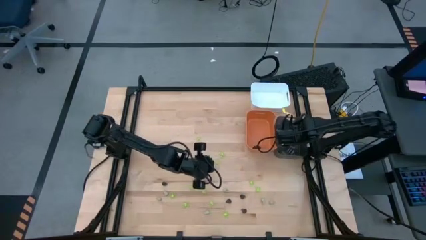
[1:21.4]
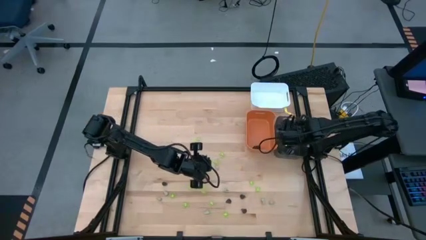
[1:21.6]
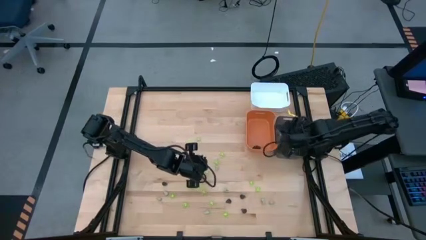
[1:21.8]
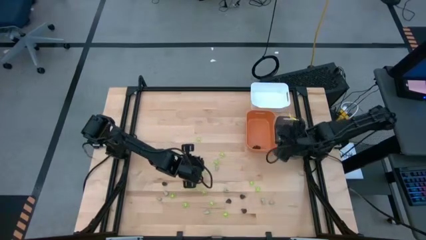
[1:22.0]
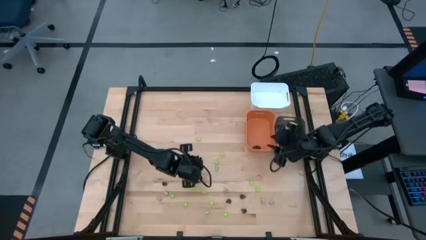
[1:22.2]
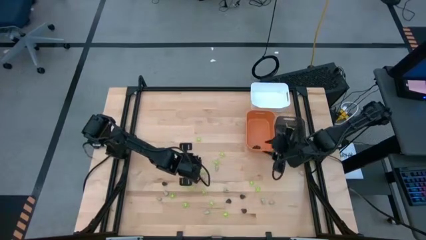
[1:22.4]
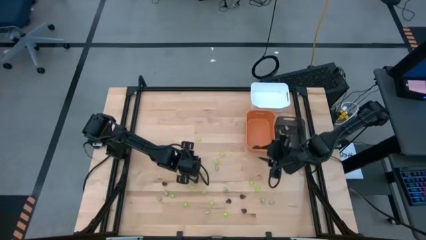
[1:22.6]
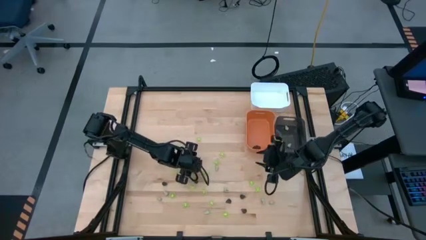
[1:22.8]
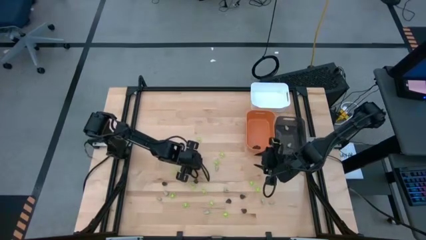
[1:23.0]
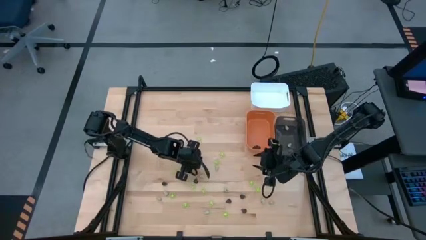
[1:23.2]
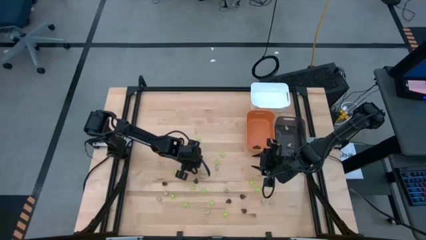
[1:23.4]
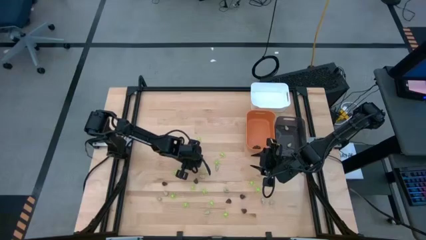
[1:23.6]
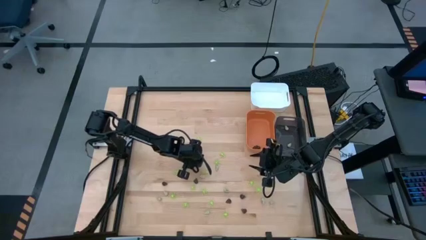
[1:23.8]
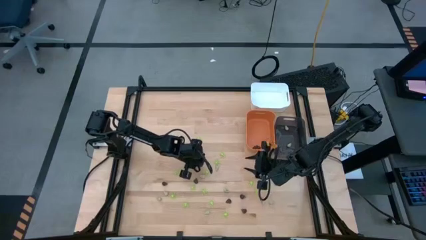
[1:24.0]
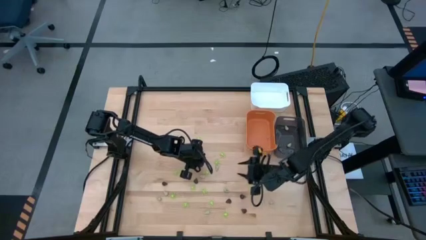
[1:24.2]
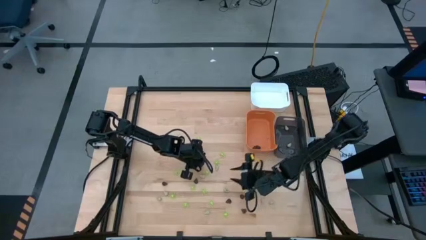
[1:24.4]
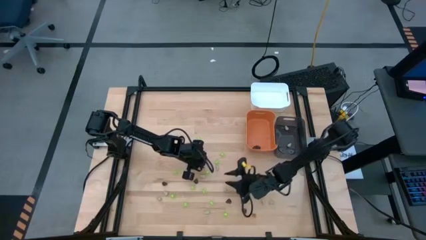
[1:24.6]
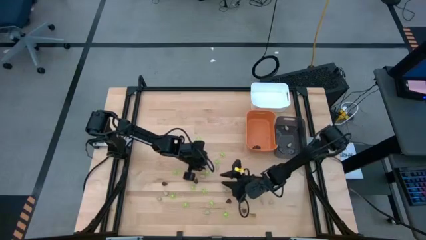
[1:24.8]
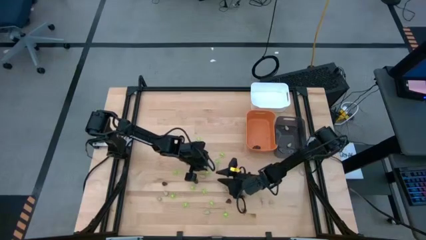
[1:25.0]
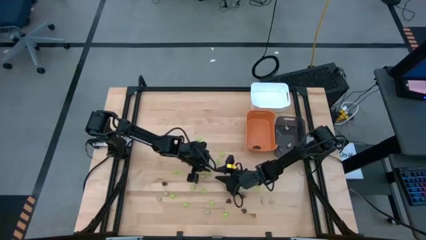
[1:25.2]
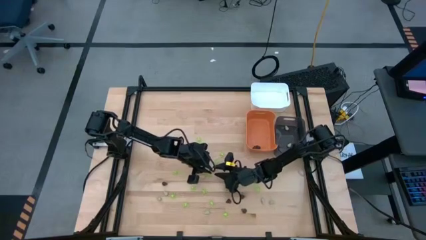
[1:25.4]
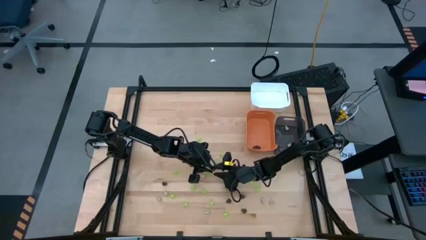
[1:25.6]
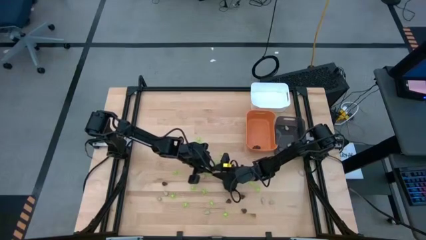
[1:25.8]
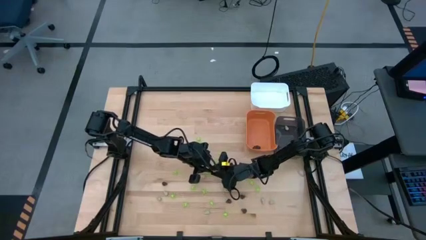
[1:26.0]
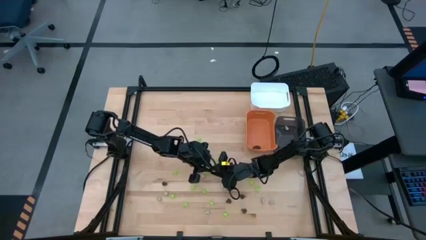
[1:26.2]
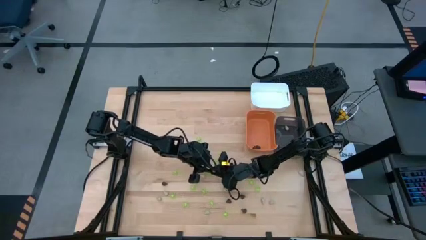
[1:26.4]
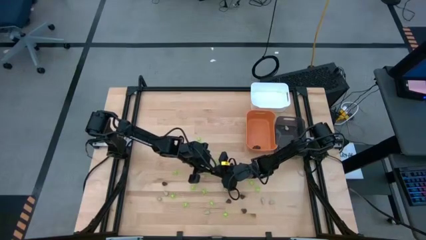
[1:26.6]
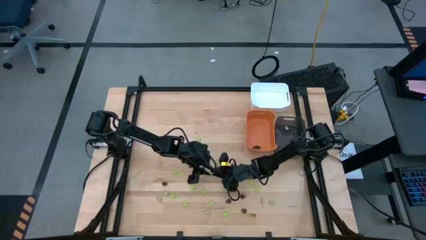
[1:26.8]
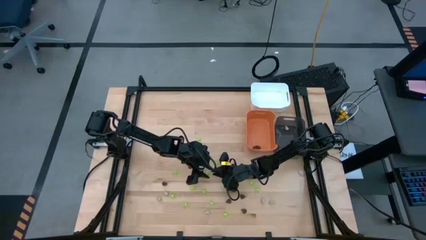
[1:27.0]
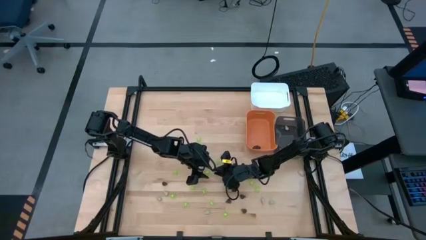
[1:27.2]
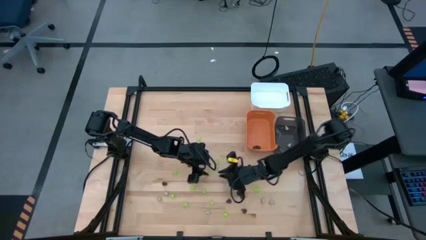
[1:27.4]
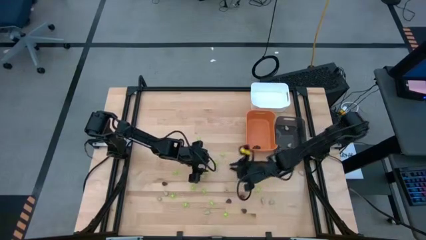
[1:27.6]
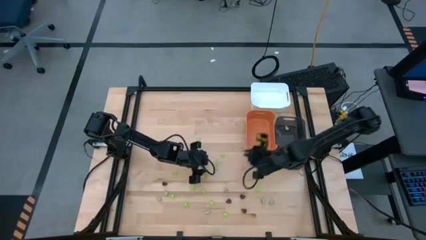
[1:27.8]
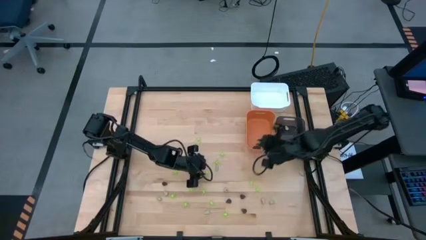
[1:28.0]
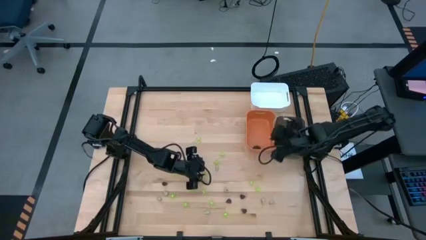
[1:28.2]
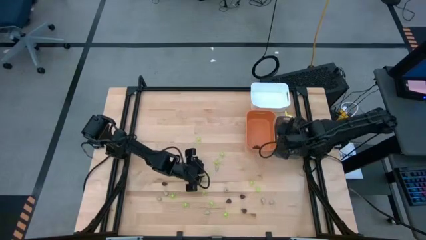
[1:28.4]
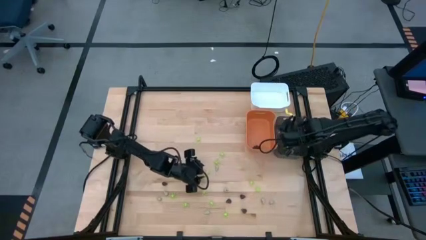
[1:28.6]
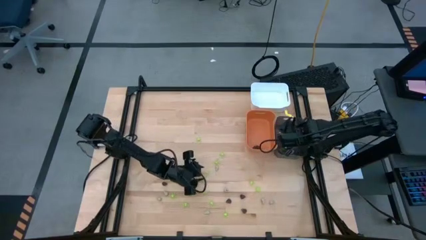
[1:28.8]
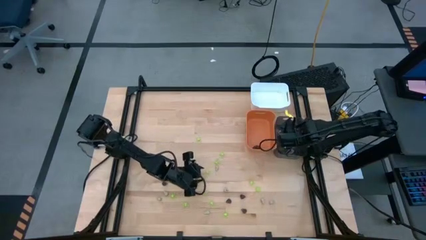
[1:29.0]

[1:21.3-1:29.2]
Task: Sort Halloween decoration
Put the white skull toy into the black bin

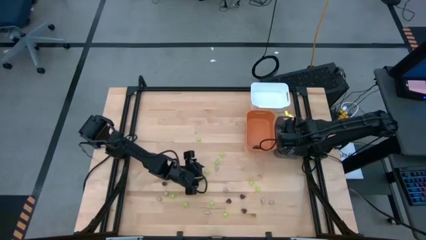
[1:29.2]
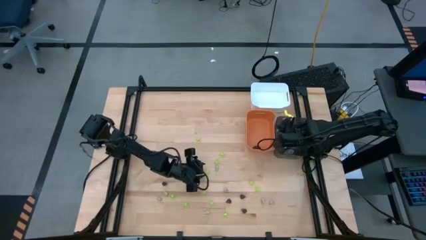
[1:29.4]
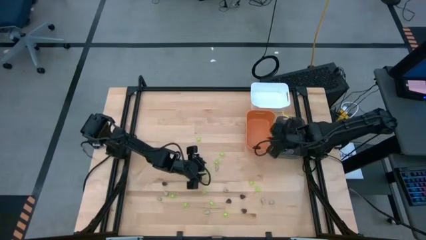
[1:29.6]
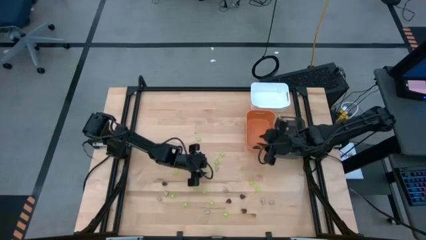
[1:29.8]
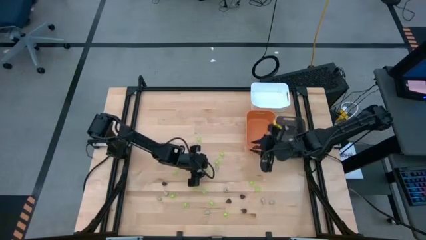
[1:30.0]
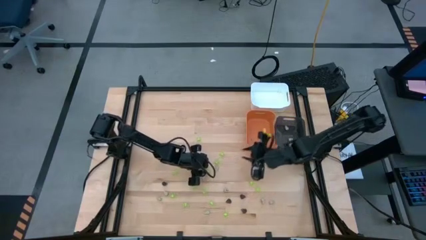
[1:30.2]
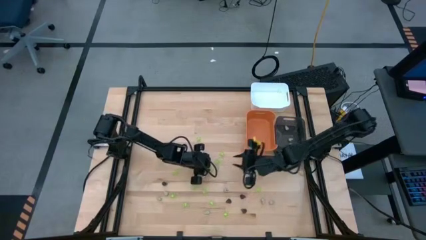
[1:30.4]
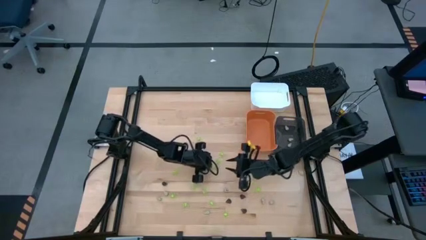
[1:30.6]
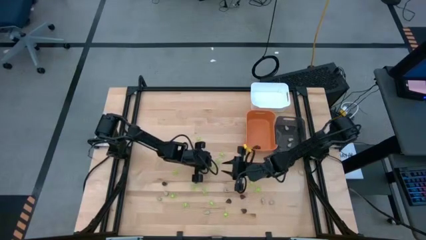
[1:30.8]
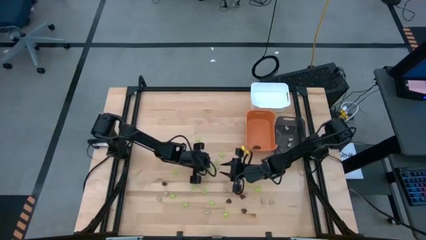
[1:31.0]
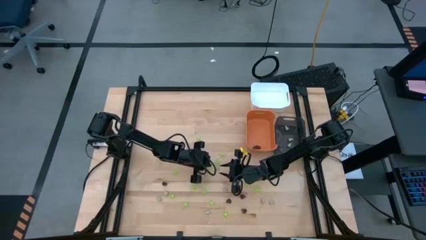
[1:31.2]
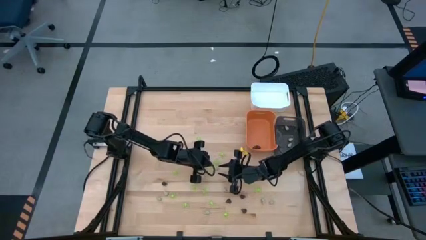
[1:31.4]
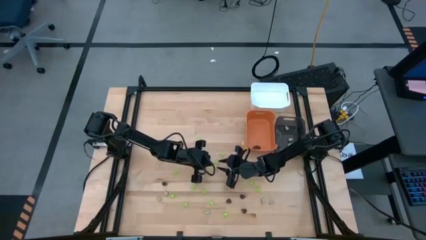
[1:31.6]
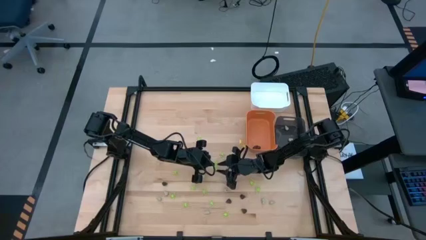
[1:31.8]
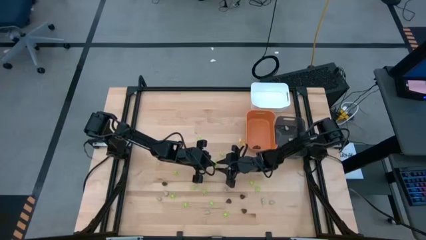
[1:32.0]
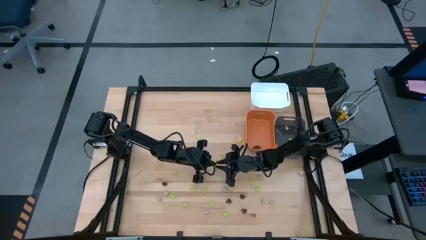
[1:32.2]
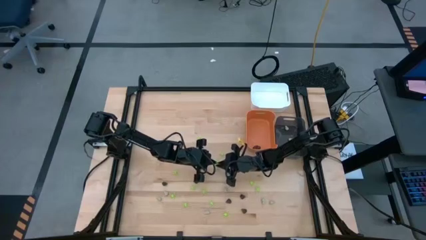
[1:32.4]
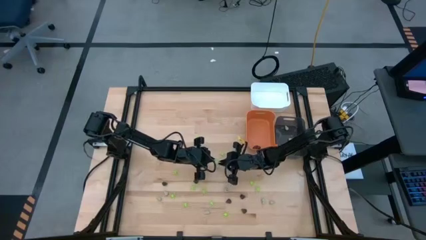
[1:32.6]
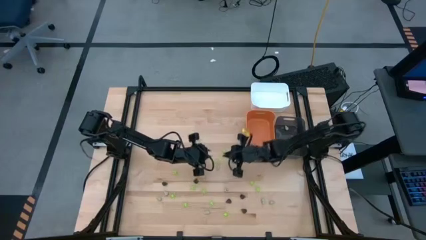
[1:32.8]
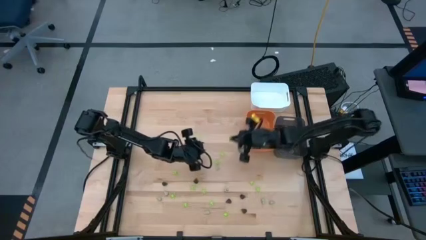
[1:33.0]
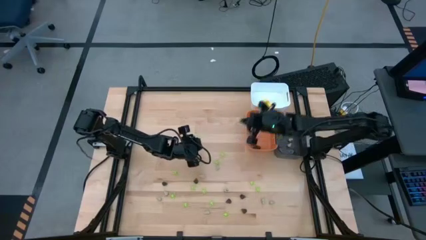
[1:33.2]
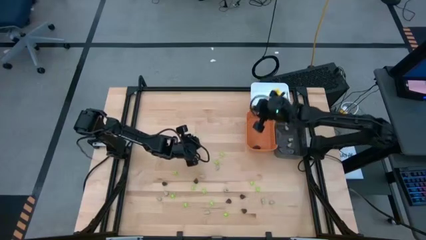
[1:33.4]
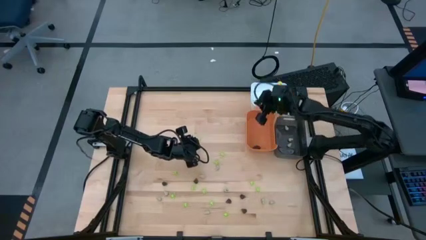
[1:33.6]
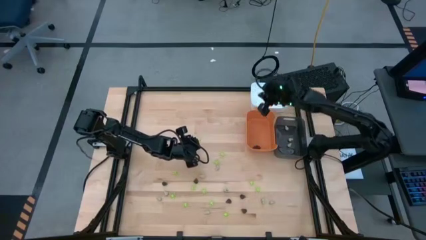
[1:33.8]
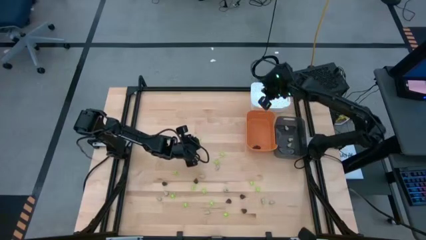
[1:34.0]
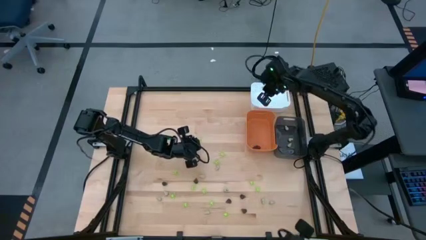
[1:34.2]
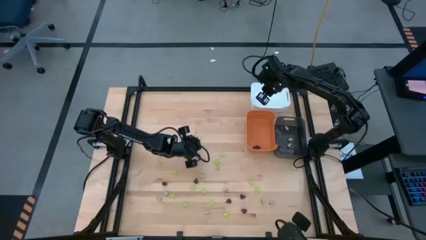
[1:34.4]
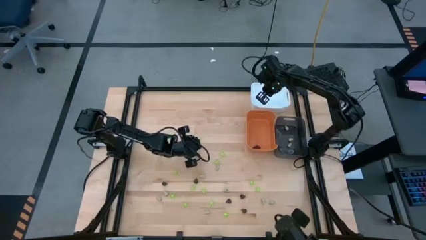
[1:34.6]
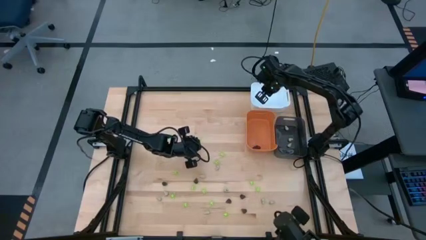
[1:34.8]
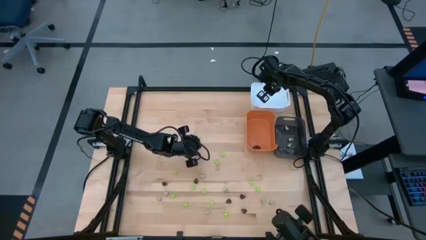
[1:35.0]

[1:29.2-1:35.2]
Put the green spider toy into the white bin
